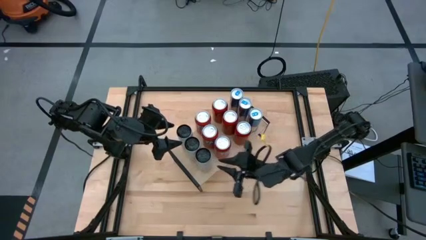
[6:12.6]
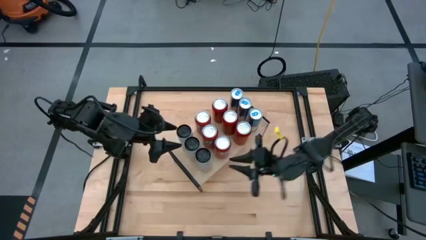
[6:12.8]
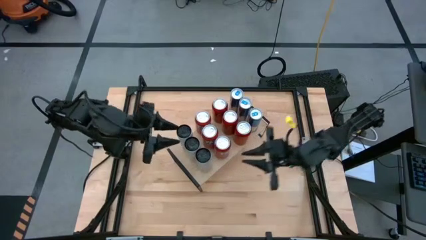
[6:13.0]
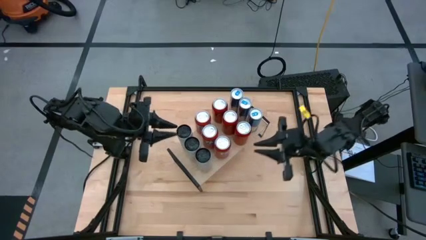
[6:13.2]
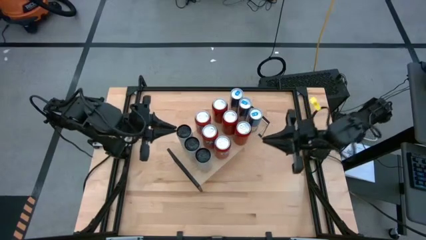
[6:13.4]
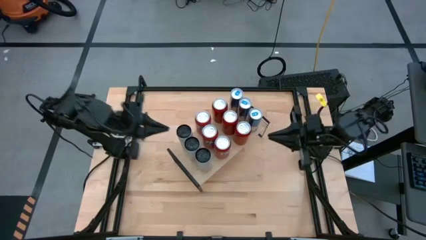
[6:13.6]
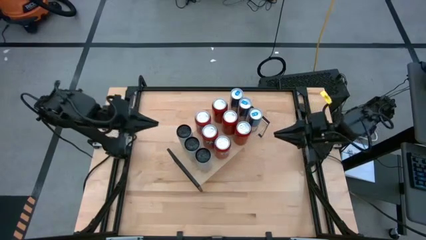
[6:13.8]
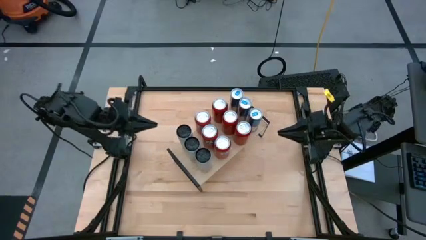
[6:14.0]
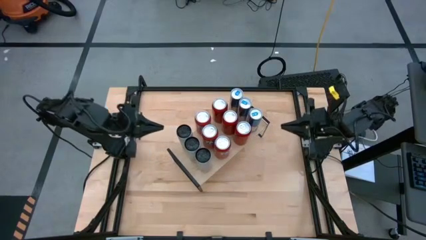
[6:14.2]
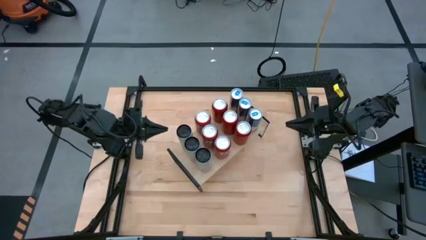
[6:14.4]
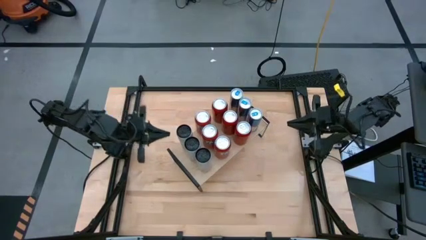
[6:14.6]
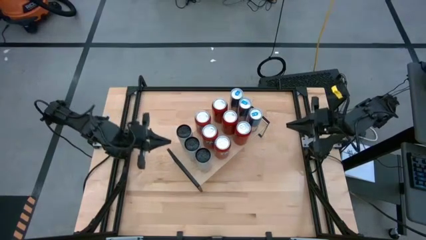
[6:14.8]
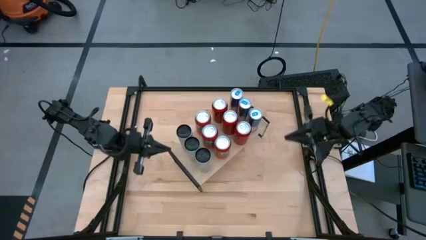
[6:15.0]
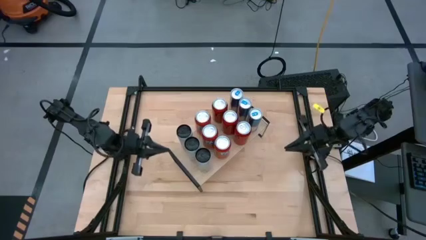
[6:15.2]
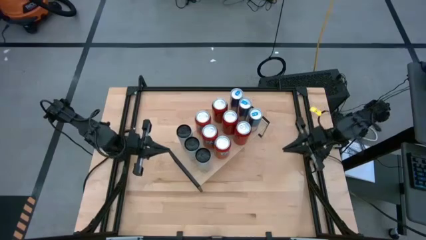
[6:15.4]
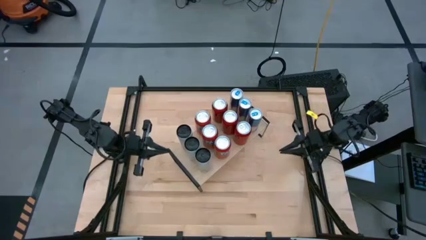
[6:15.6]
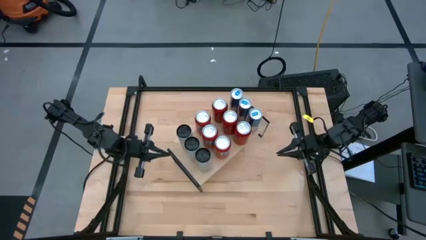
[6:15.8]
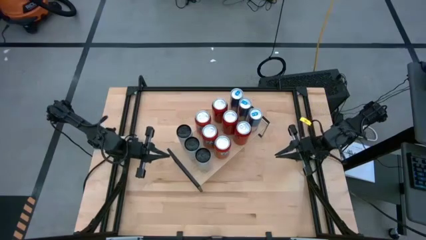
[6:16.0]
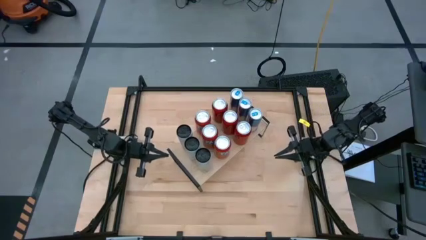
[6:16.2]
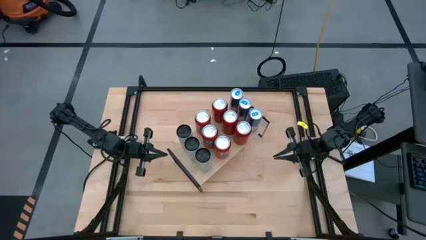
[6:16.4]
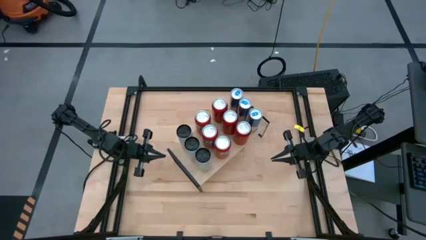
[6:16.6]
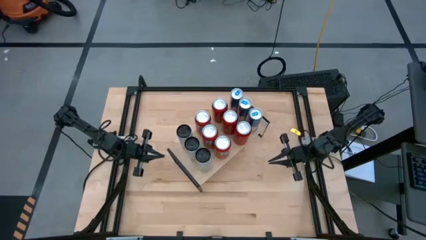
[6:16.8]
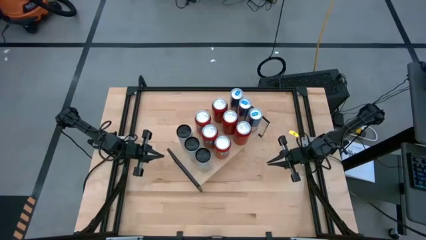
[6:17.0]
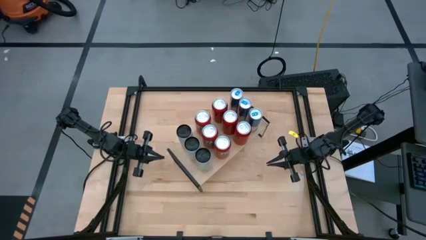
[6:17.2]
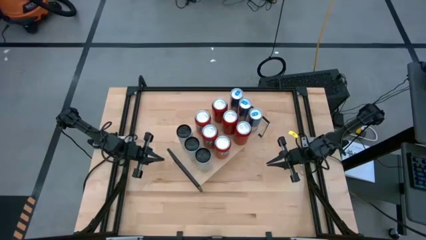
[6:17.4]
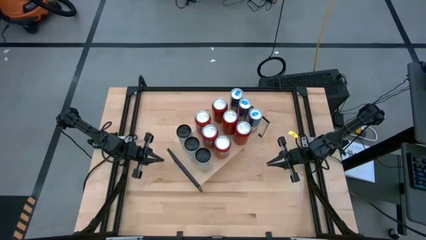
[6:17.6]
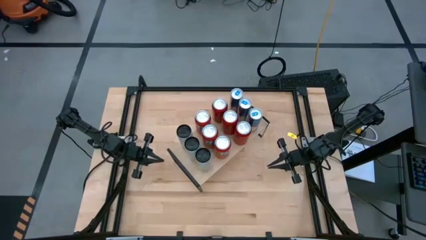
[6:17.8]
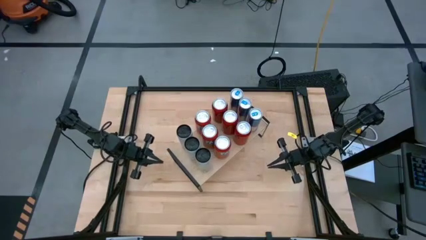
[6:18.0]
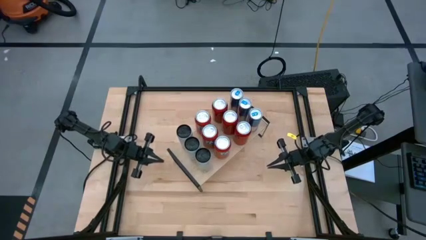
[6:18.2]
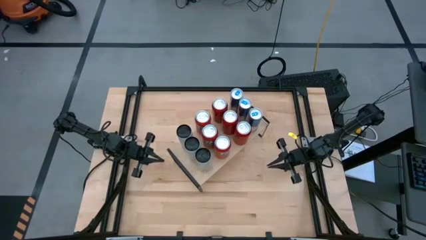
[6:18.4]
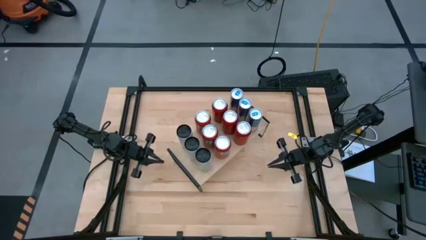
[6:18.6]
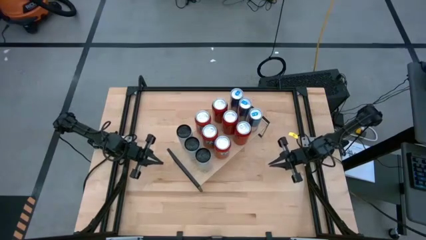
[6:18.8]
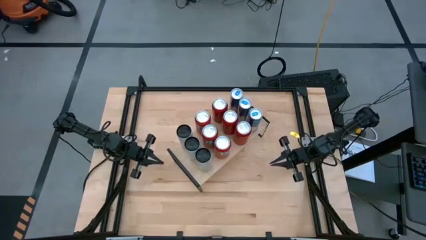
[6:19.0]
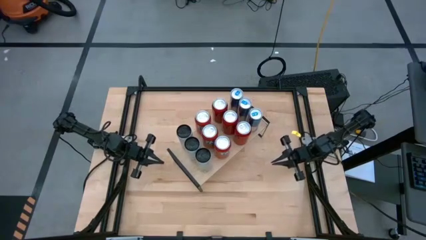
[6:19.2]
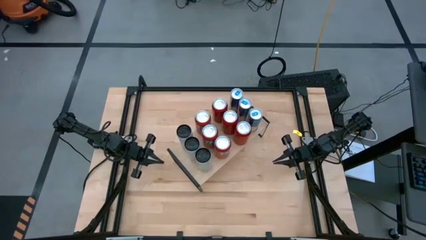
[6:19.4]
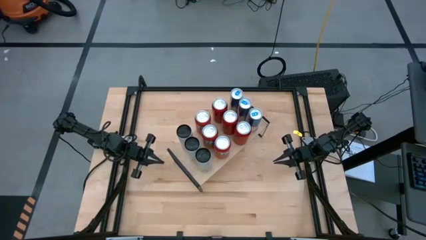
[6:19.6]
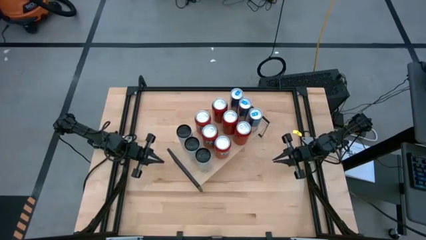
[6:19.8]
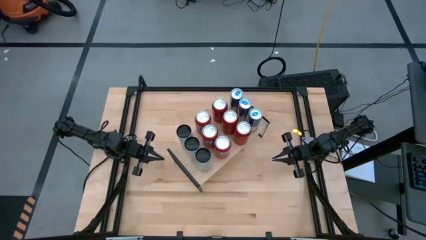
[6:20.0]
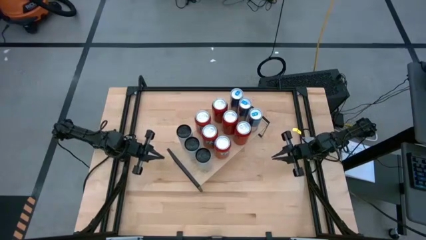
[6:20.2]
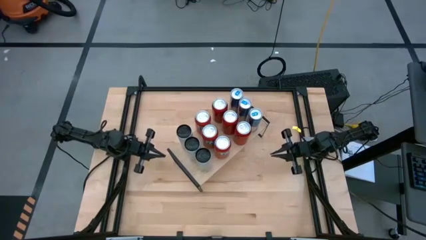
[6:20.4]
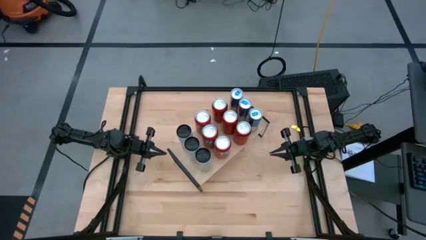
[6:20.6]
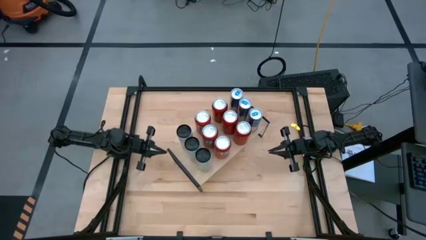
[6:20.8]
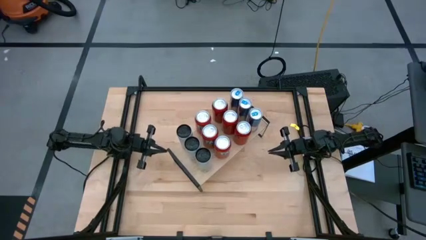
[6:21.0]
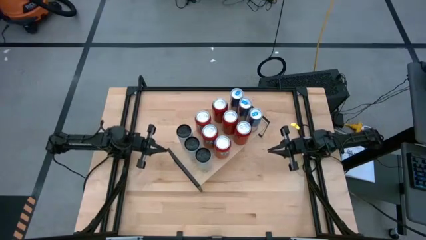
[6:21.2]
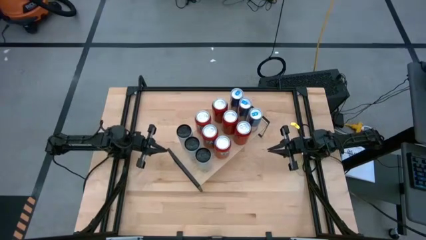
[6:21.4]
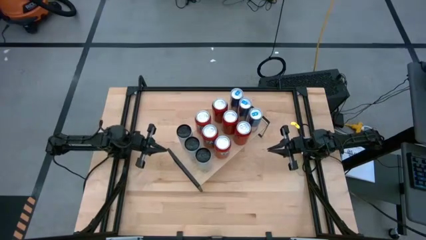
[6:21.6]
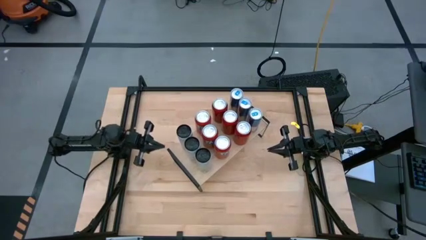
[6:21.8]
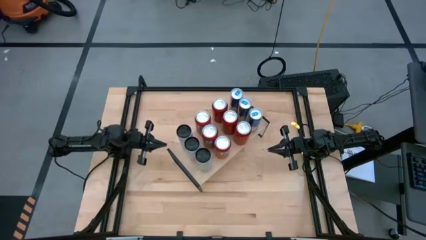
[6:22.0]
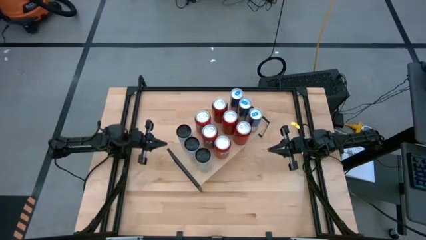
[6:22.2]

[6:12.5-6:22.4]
Task: Place canned beverage on shelf
Return to Home Position

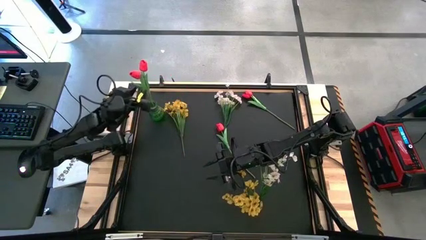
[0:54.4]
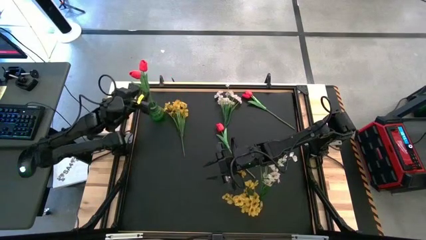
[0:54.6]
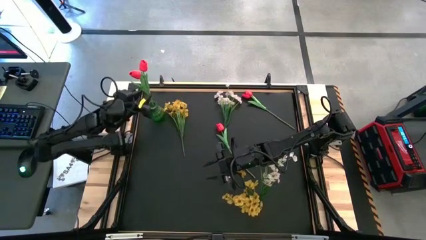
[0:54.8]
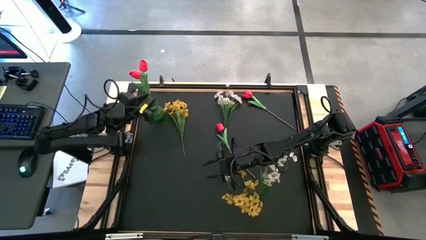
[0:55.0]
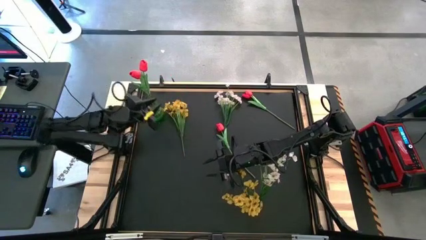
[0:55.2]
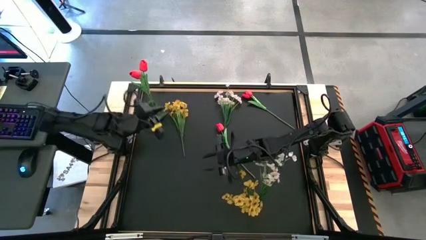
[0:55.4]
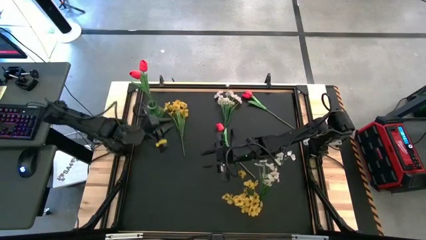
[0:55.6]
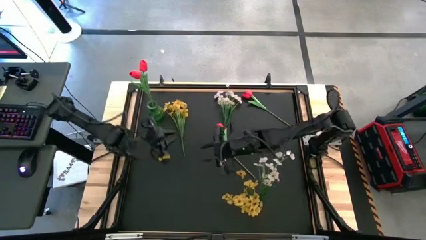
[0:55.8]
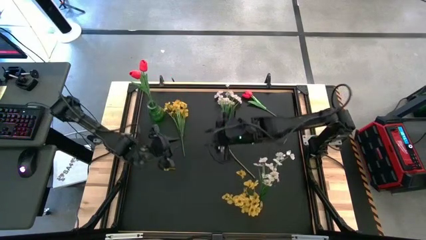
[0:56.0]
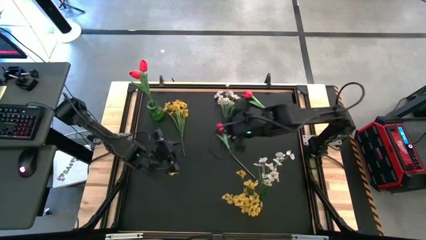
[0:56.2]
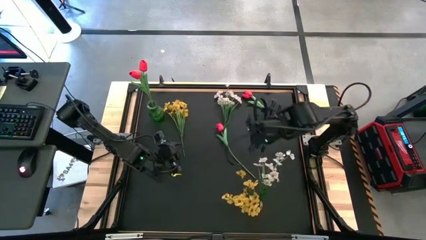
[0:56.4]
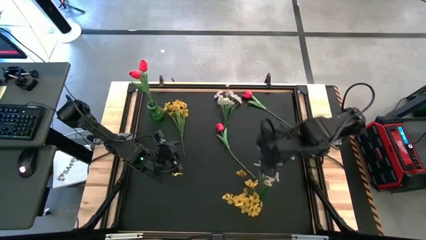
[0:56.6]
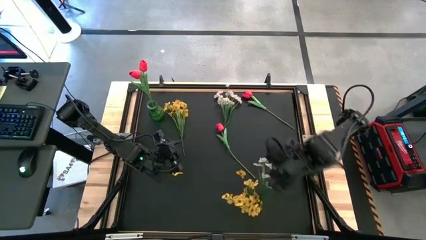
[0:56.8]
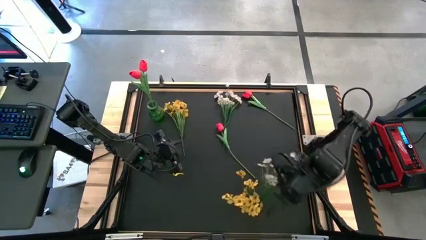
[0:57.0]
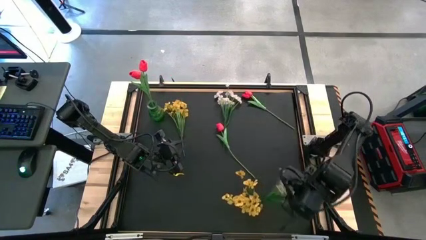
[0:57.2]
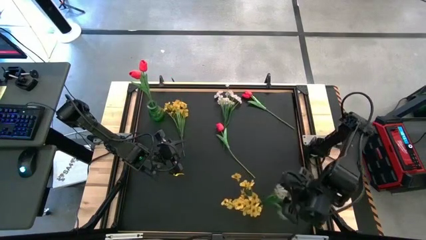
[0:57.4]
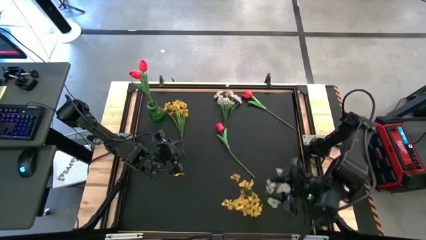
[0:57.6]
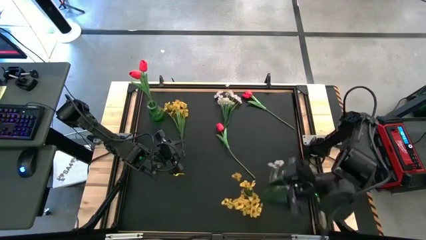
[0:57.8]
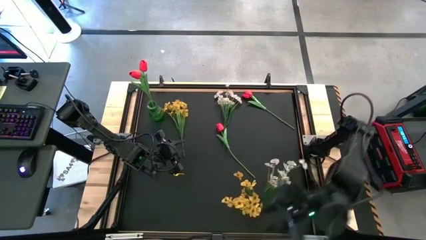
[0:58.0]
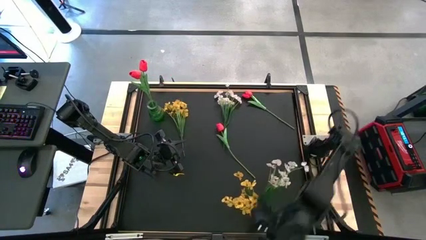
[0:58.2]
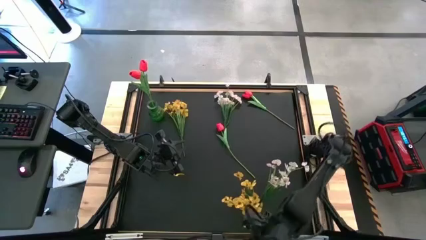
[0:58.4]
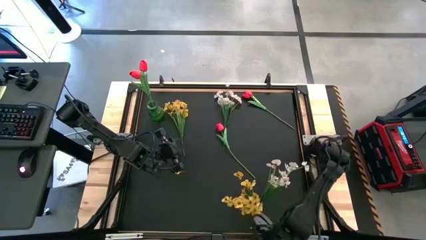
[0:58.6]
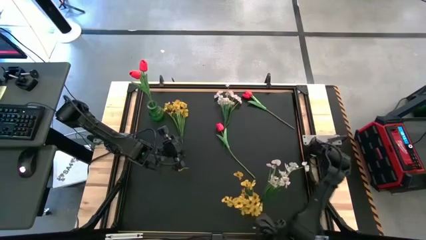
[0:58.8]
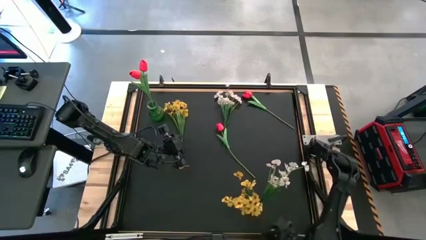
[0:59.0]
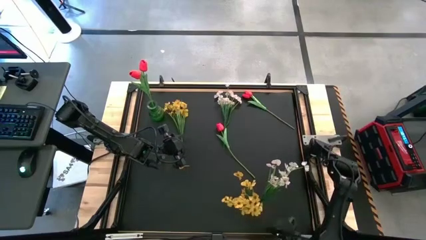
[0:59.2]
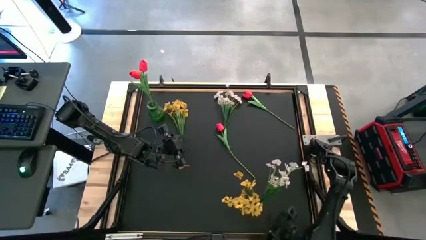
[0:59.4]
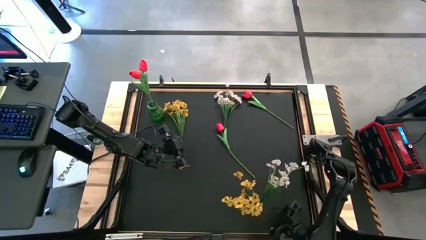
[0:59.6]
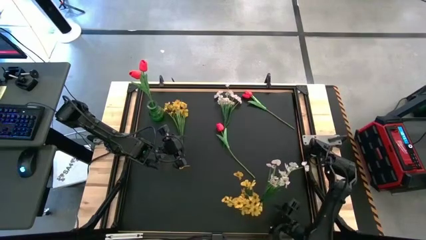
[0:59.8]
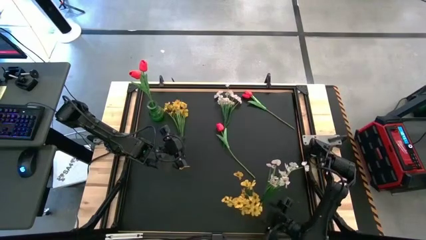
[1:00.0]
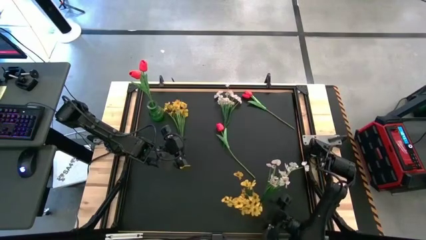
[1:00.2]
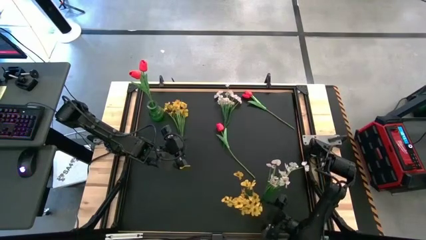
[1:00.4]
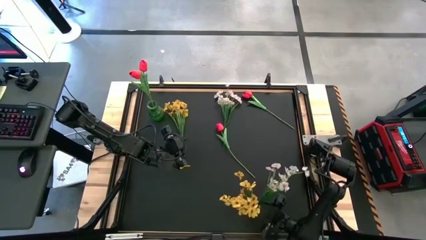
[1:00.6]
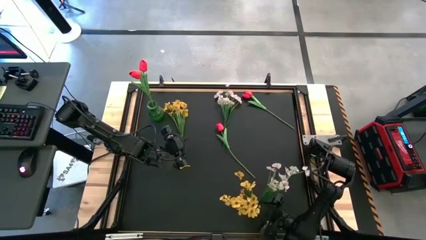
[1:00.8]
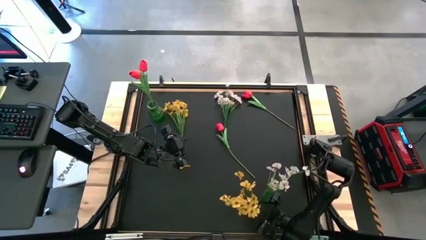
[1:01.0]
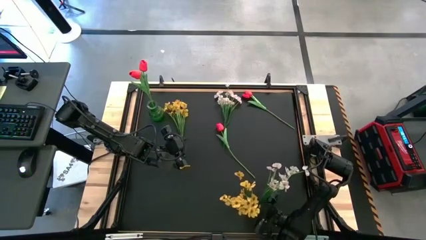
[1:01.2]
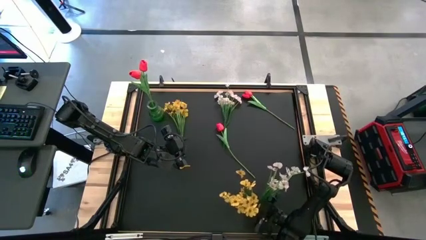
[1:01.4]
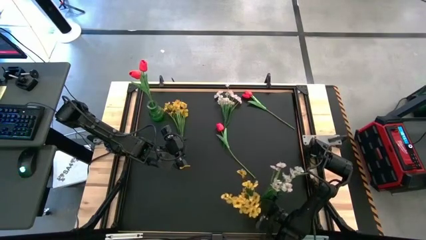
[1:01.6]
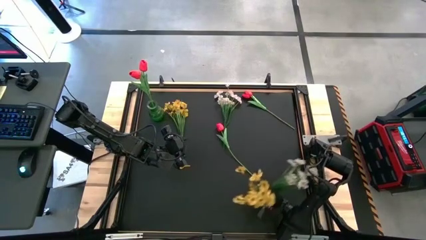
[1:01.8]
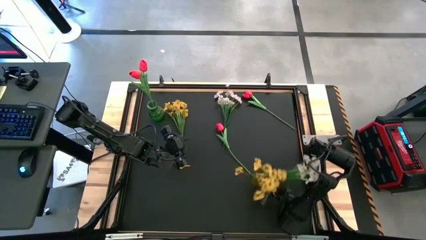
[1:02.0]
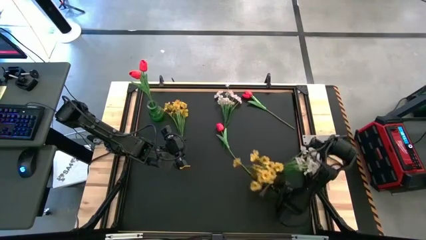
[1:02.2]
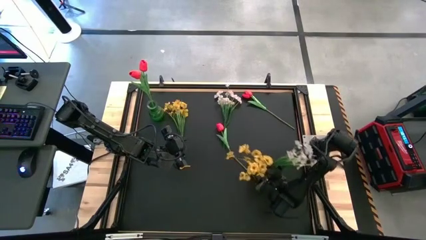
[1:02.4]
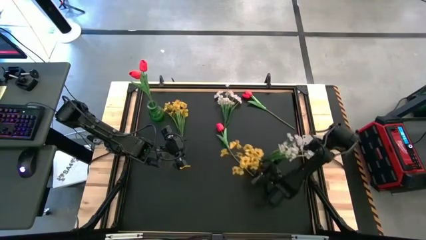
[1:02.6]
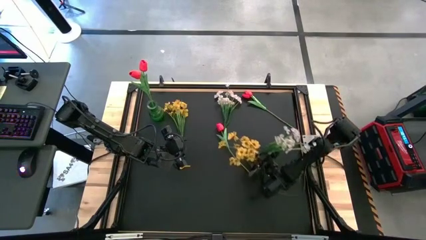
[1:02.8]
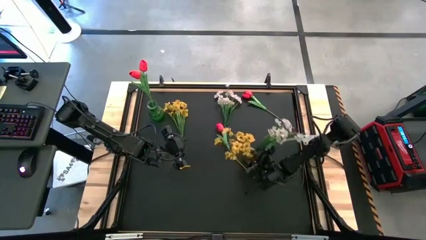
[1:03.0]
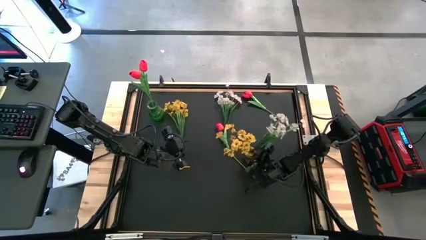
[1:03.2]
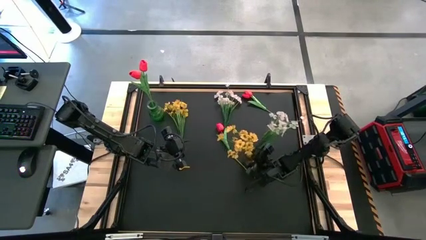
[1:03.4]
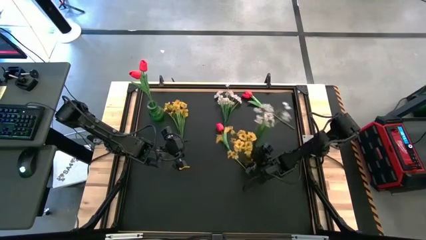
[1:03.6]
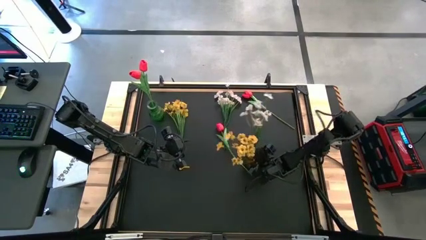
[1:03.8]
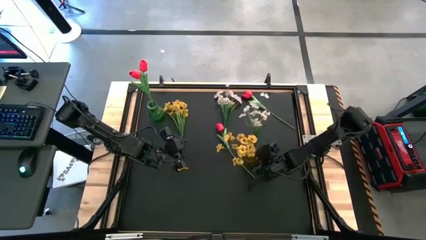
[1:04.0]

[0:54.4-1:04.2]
Task: Sort flowers into vase by color
Move the yellow vase to the middle right of the table
